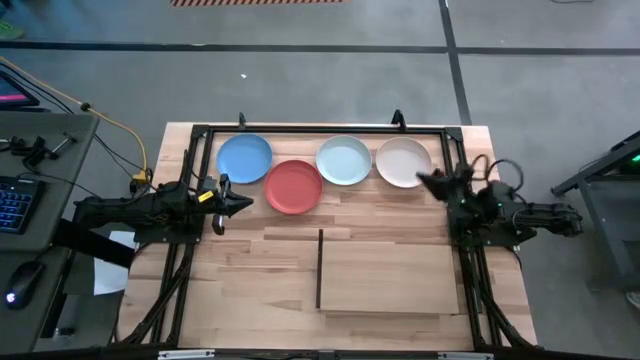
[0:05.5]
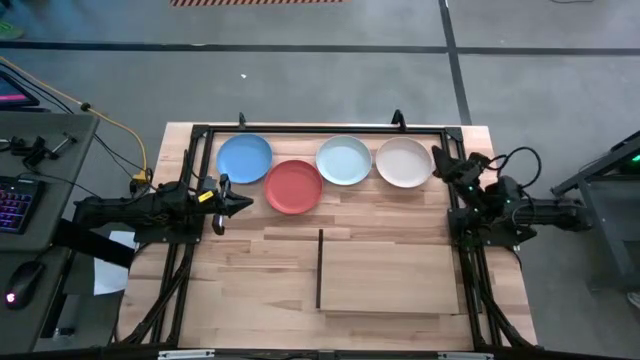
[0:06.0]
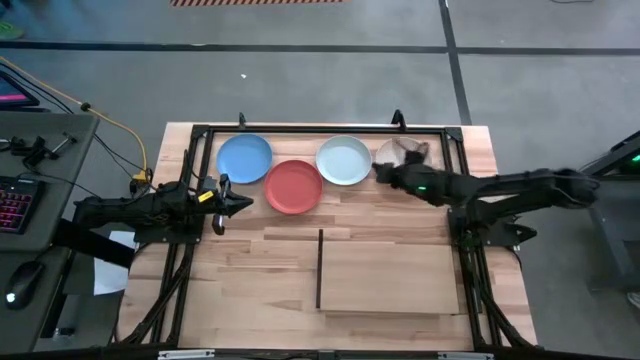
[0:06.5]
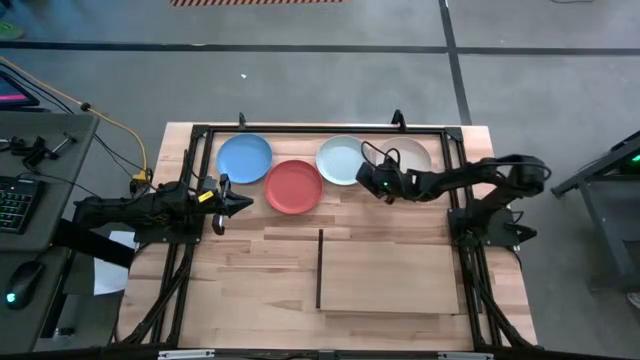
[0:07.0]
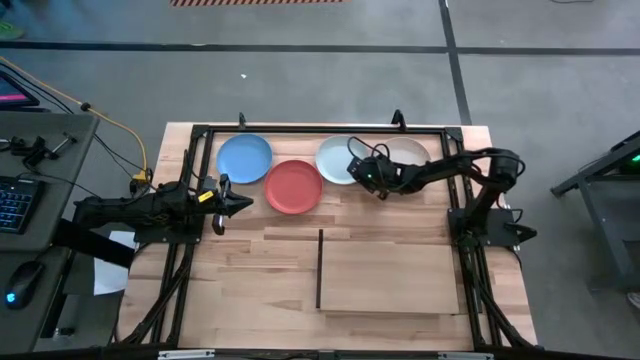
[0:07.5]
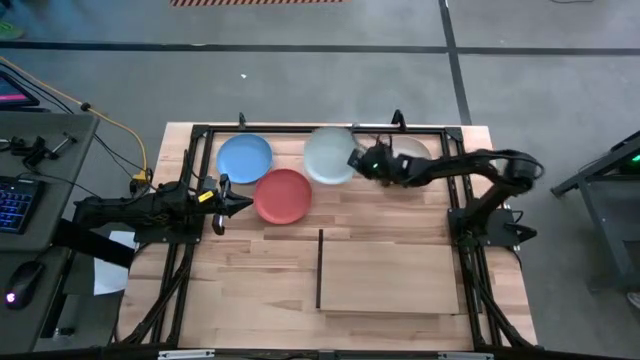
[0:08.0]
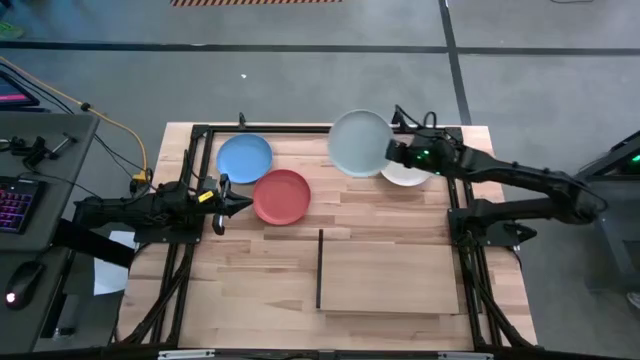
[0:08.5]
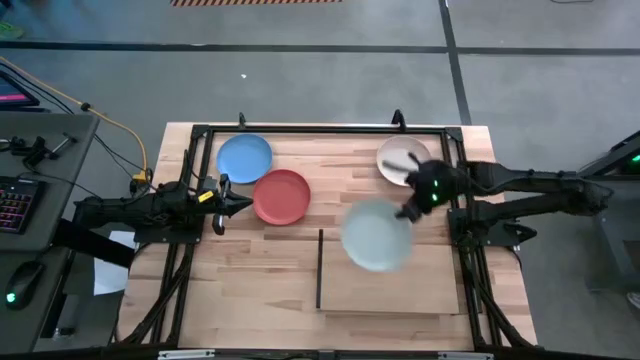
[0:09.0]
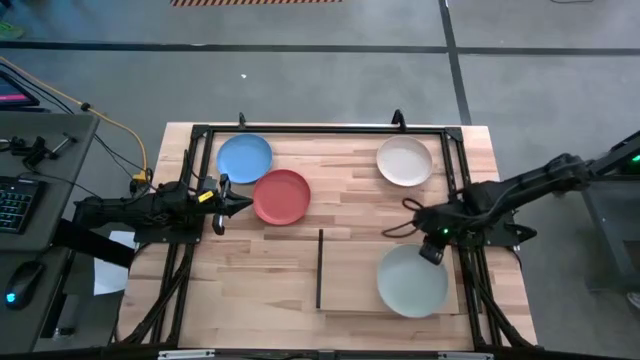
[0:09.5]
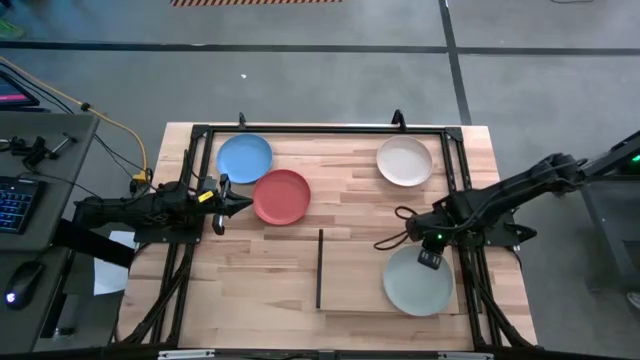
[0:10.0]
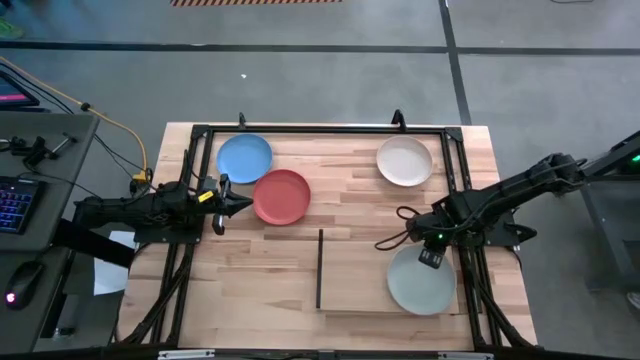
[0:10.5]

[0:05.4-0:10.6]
Task: Place and stack plates onto a shelf
Put the white plate on the shelf

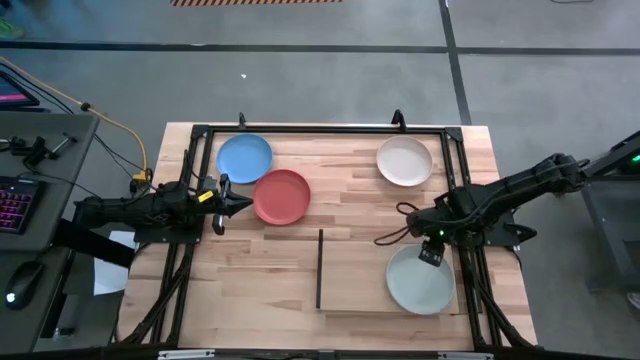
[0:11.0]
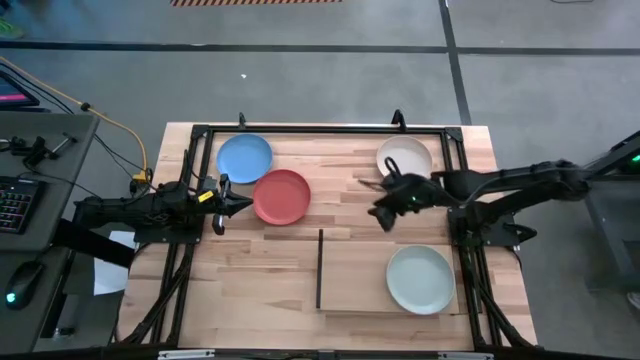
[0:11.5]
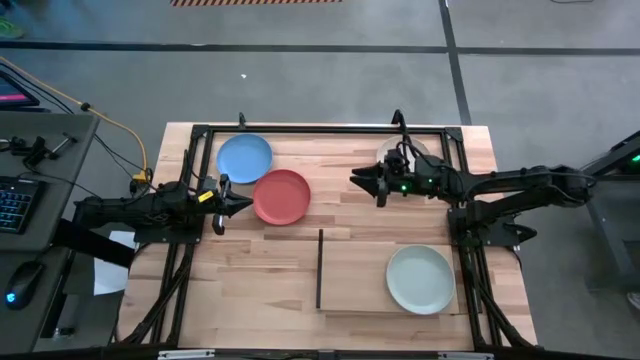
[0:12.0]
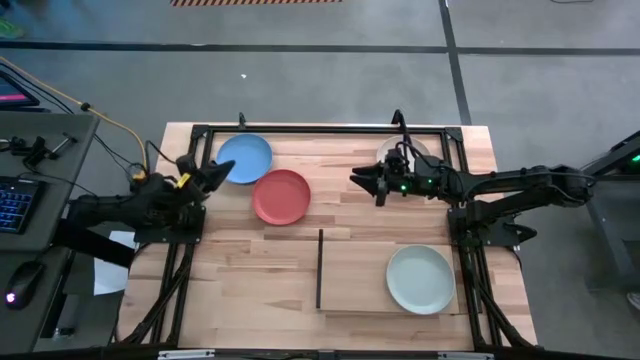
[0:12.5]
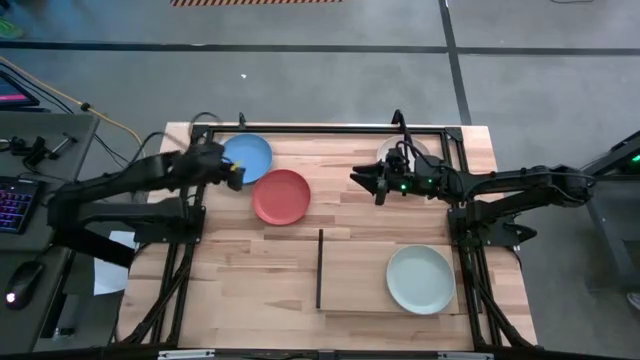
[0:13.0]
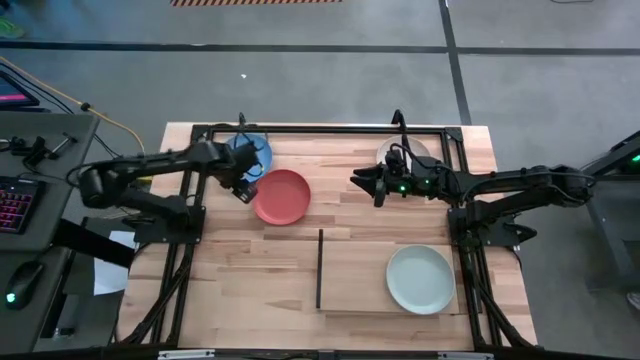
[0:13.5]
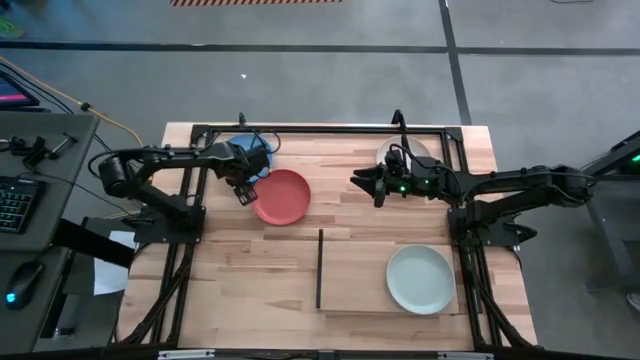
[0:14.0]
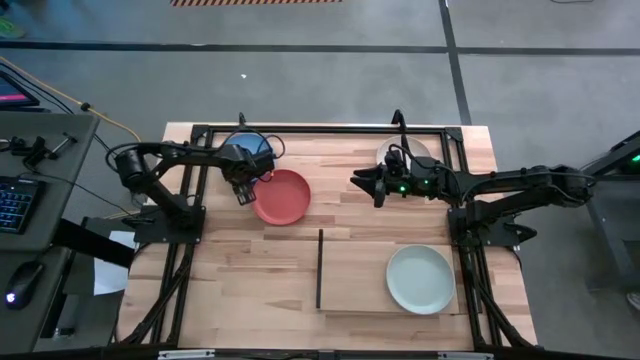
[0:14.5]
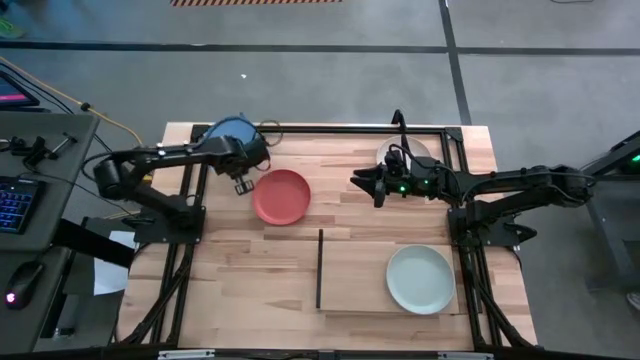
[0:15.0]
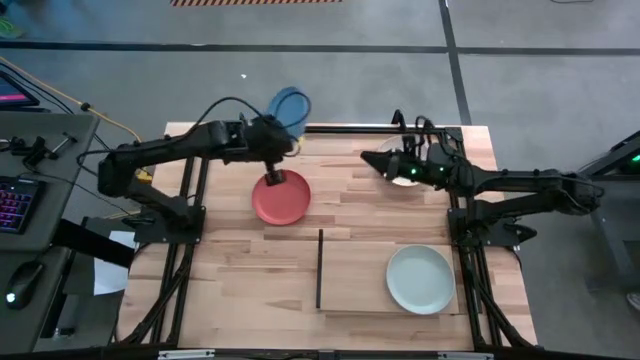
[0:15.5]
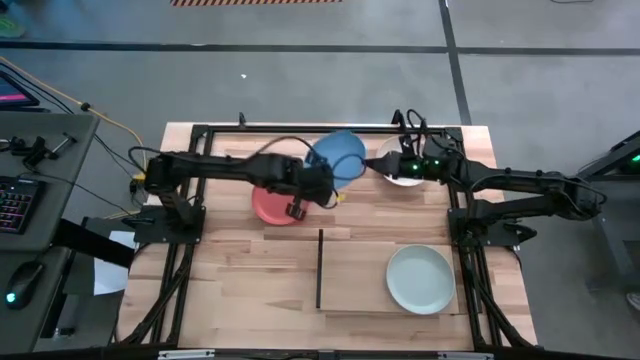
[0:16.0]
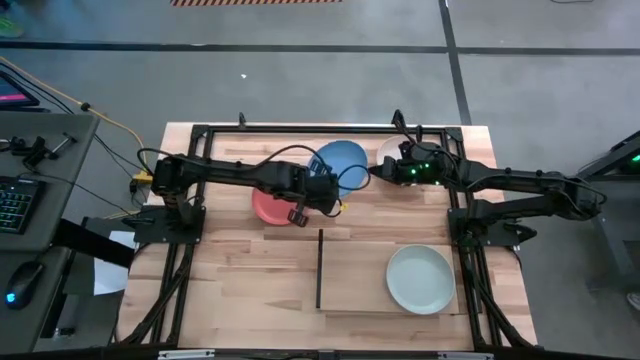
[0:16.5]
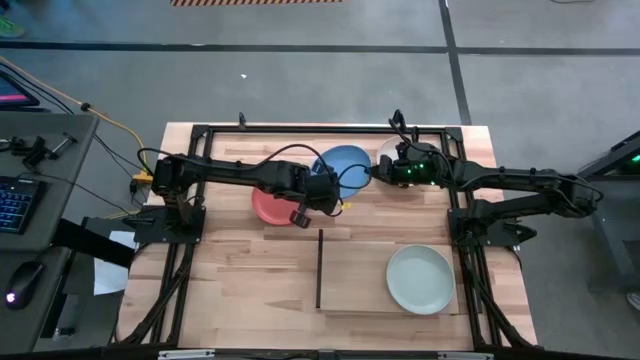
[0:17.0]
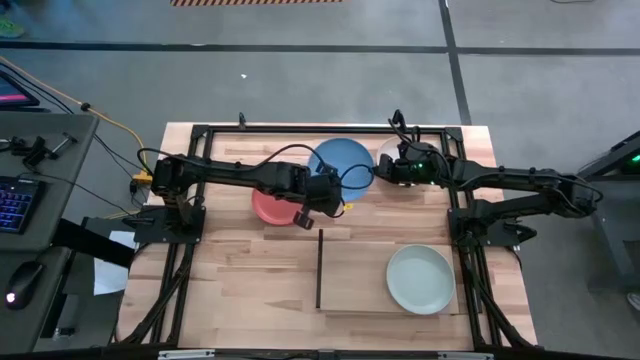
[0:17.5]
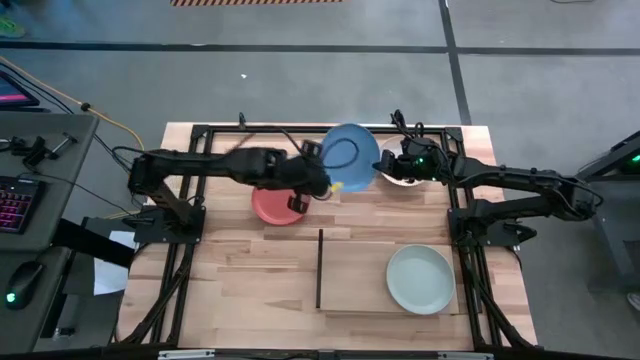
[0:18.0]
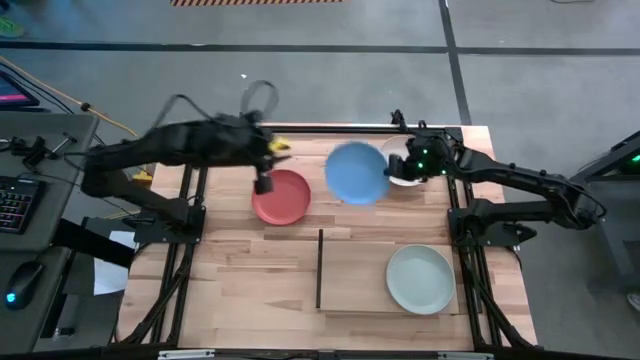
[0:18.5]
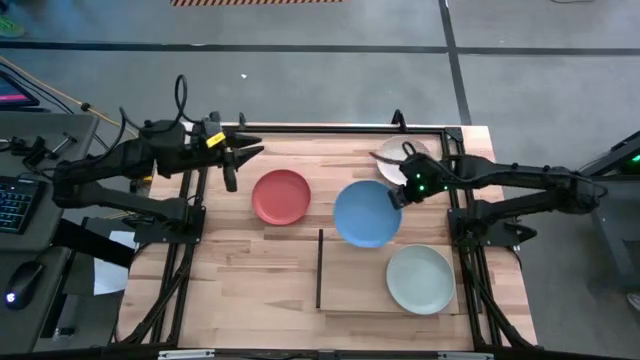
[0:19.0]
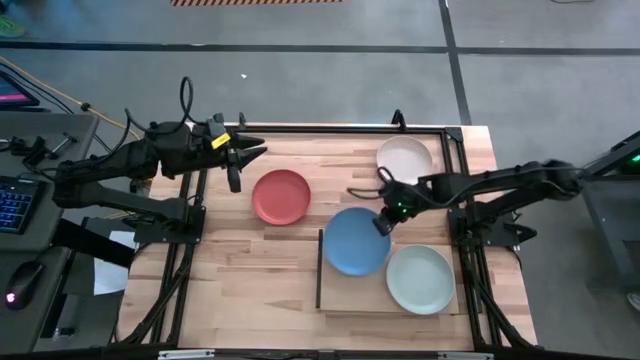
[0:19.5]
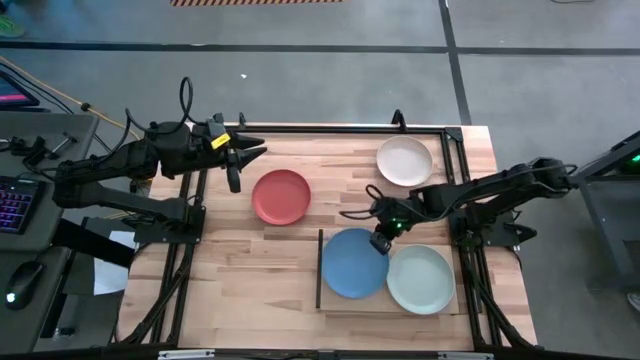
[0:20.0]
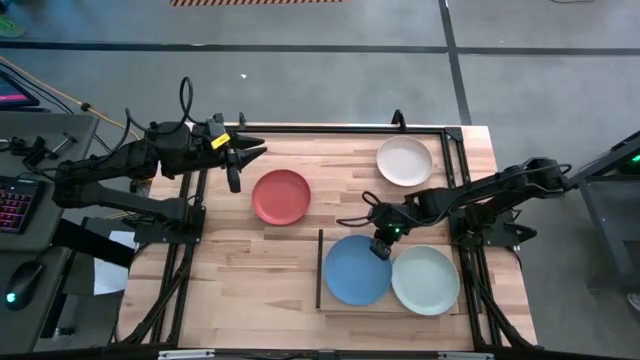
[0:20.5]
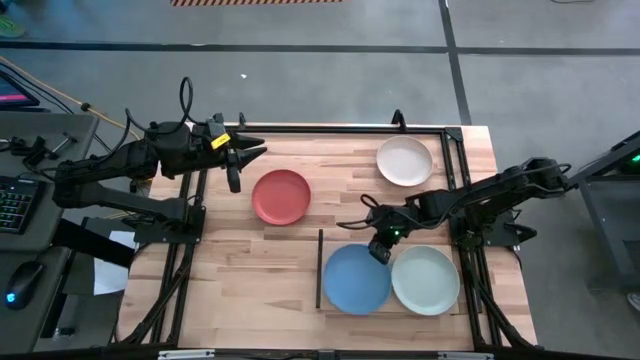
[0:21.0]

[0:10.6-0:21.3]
Put the blue plate on the shelf

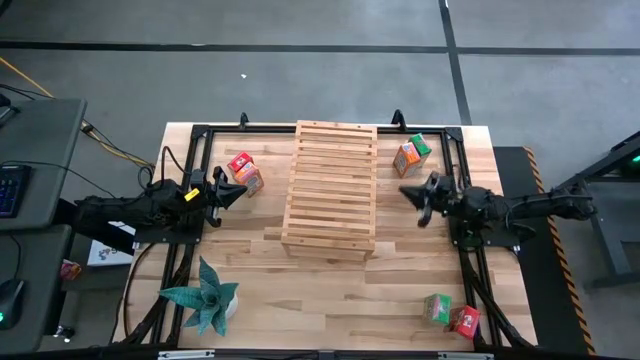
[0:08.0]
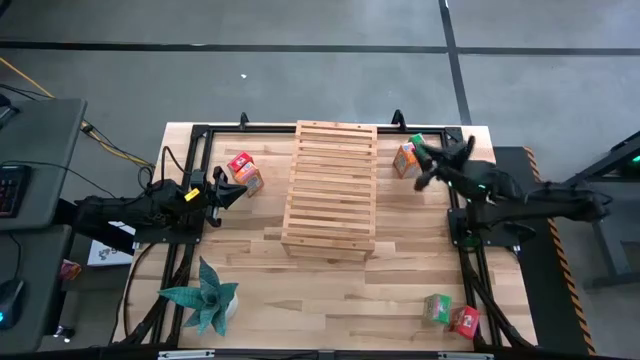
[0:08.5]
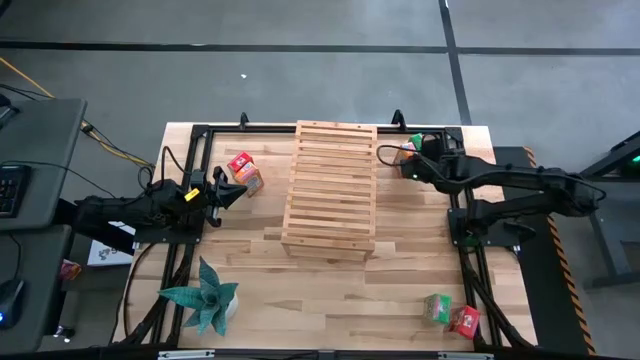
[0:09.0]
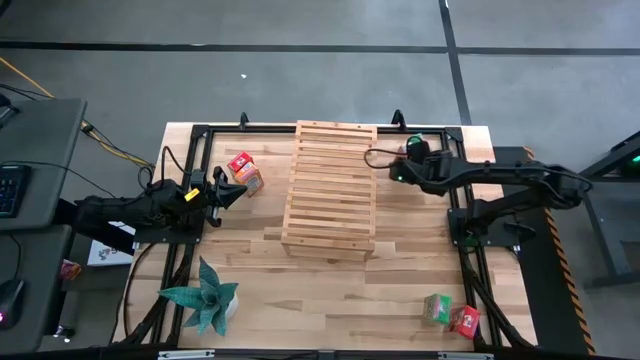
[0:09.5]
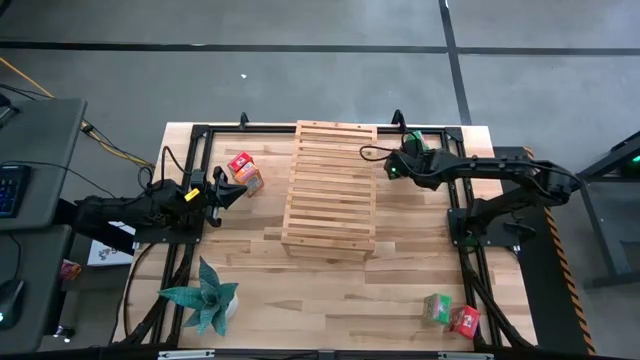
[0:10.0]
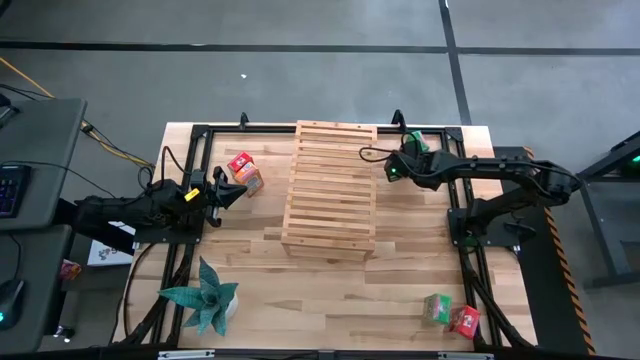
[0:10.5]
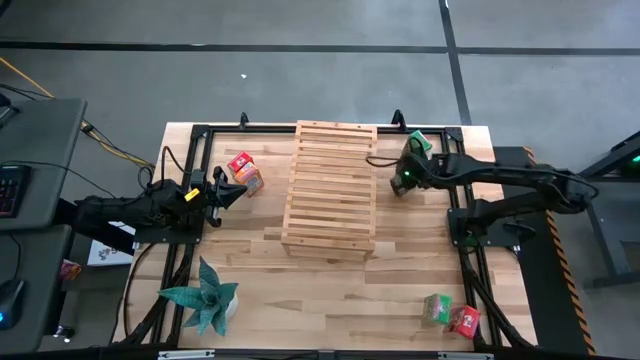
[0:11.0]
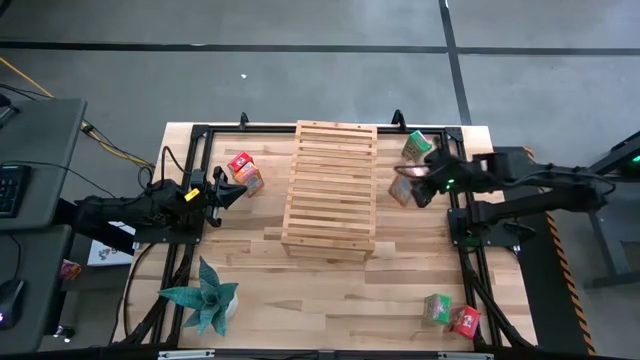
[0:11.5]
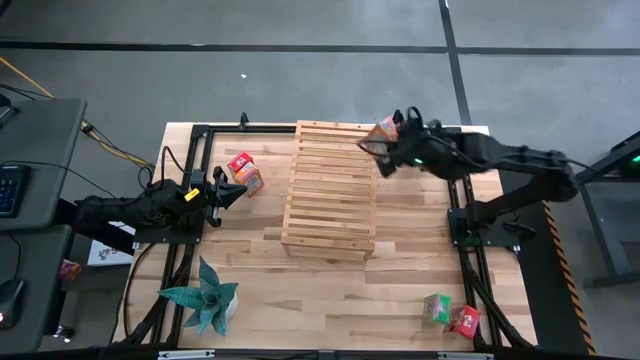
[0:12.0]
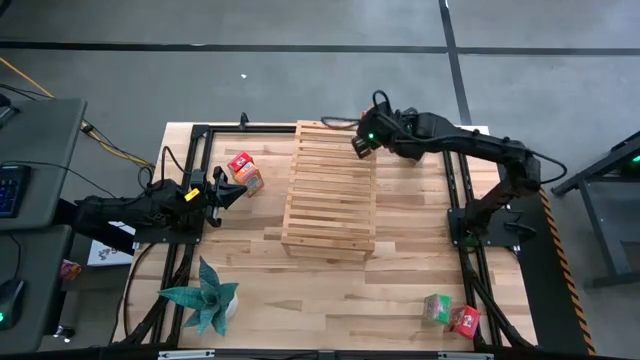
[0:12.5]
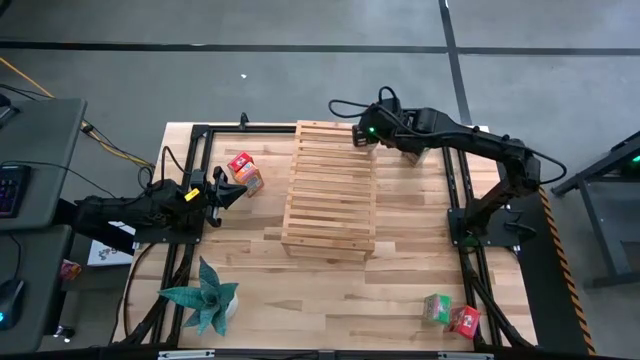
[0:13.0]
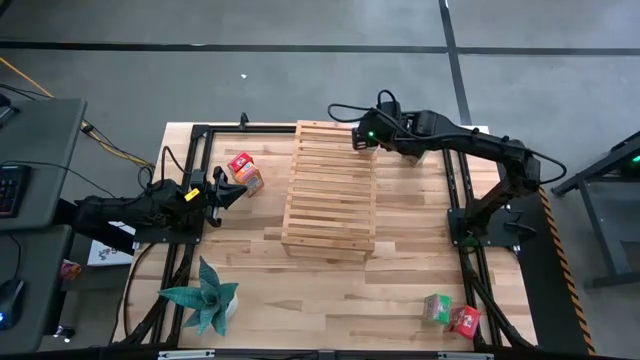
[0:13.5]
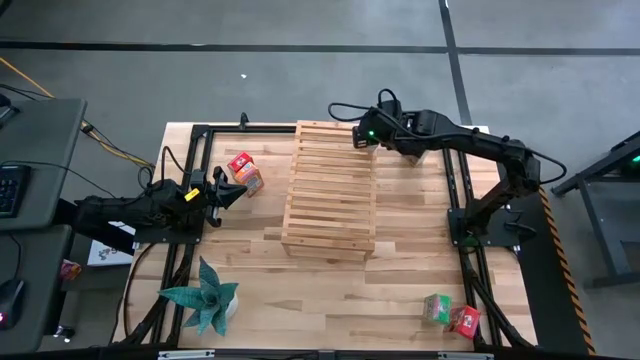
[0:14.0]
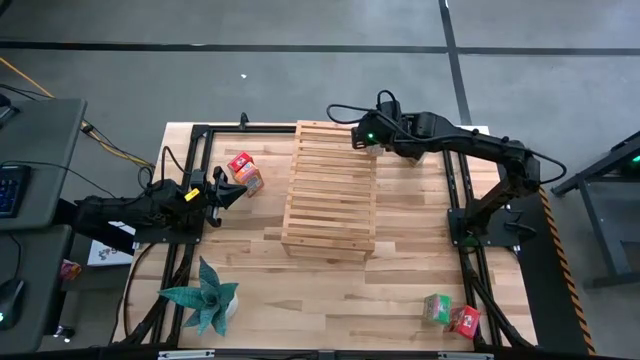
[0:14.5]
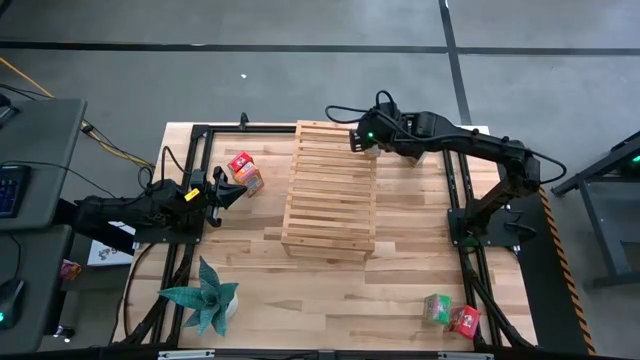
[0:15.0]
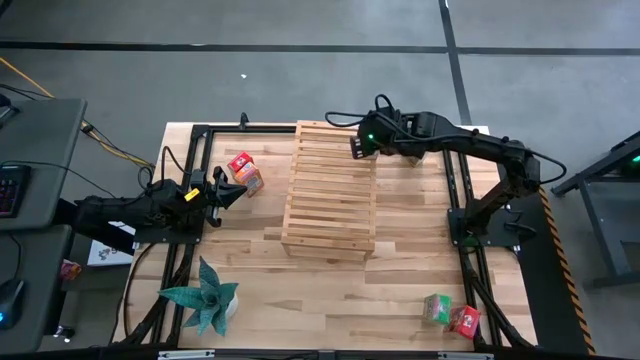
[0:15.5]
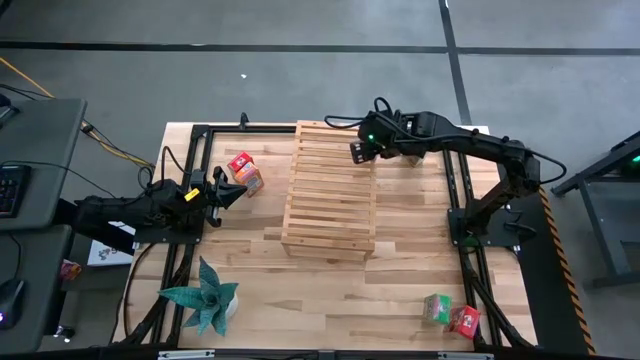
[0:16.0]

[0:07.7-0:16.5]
Task: Stack cereal on shelf
Put the right orange cereal box on the shelf
